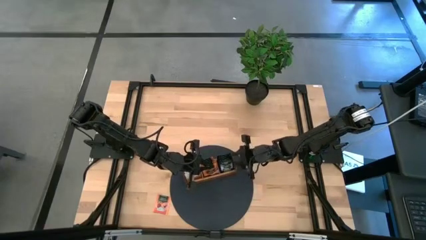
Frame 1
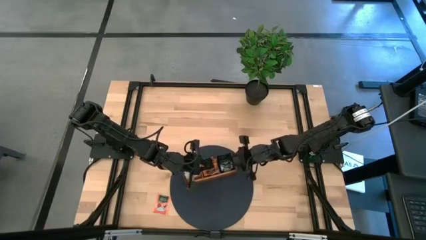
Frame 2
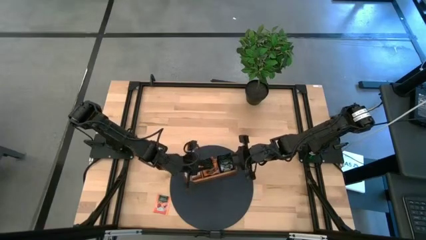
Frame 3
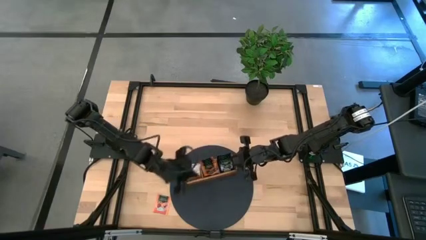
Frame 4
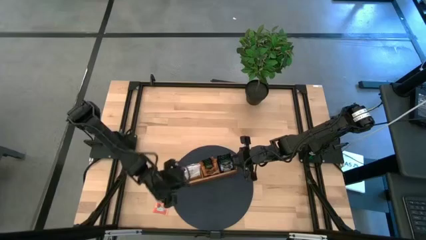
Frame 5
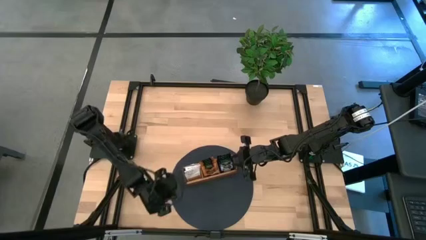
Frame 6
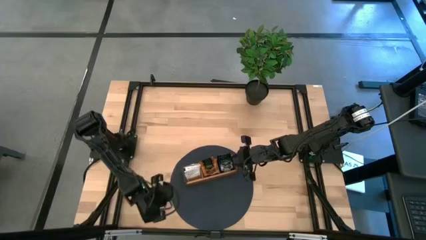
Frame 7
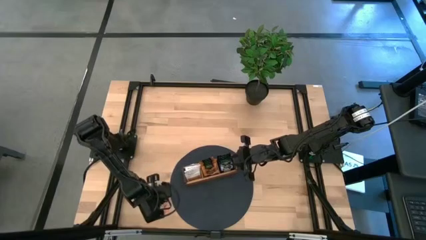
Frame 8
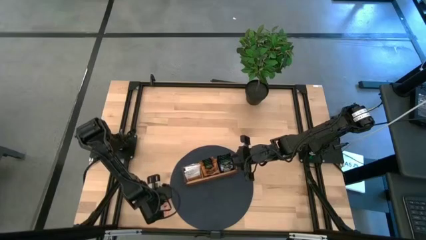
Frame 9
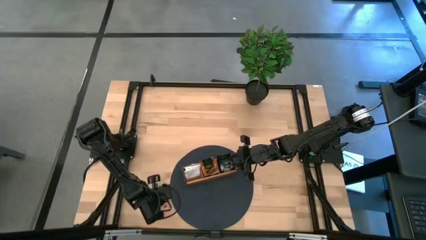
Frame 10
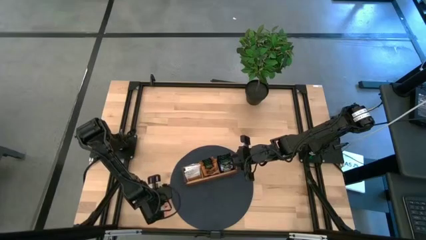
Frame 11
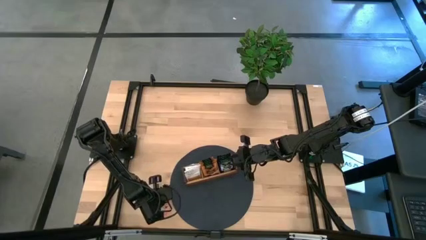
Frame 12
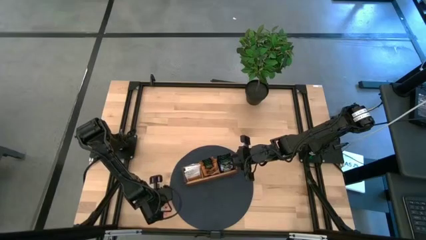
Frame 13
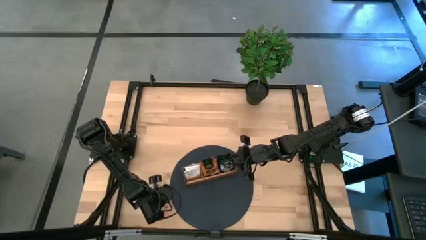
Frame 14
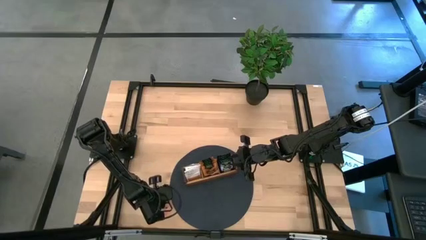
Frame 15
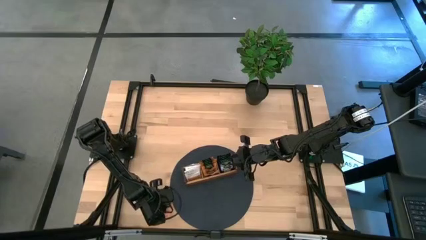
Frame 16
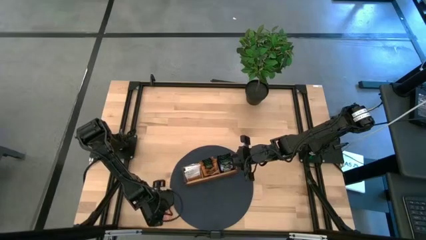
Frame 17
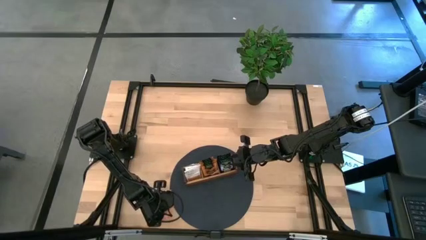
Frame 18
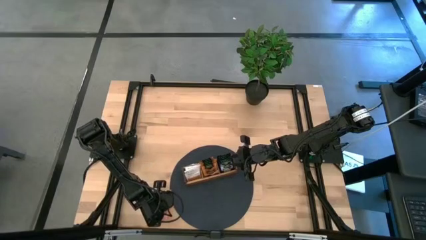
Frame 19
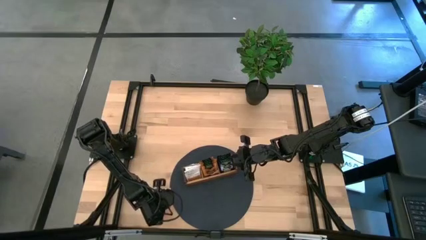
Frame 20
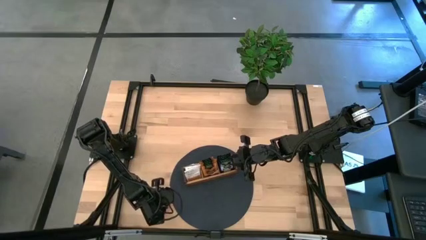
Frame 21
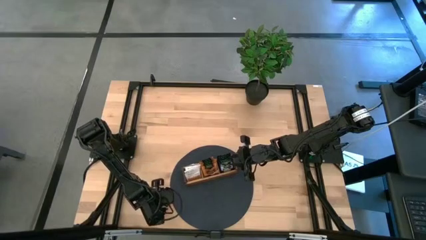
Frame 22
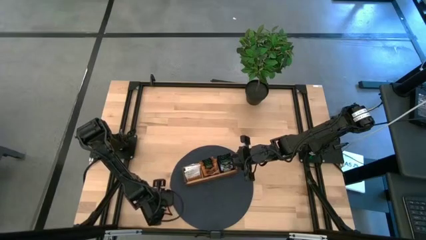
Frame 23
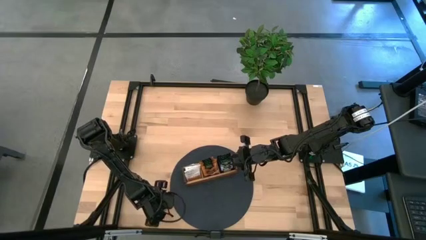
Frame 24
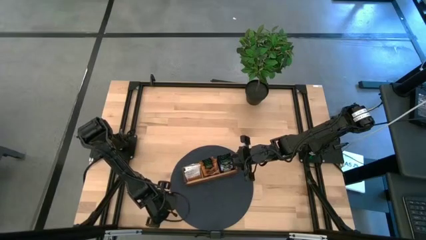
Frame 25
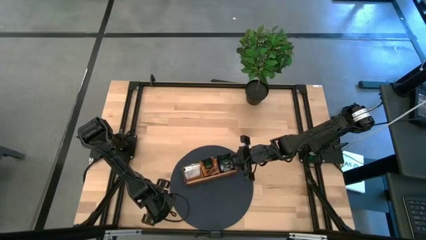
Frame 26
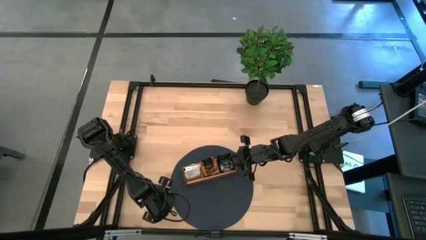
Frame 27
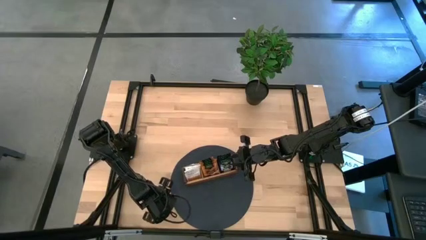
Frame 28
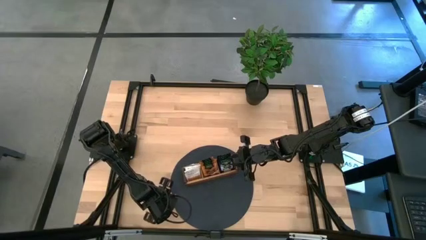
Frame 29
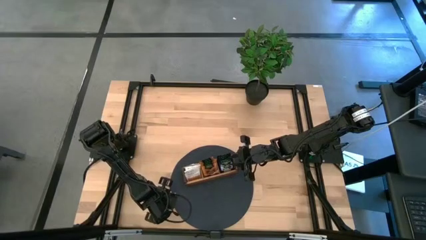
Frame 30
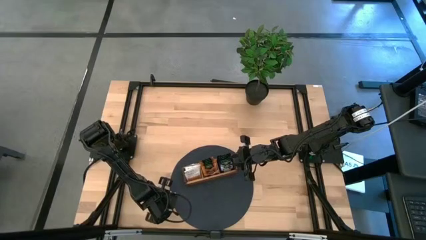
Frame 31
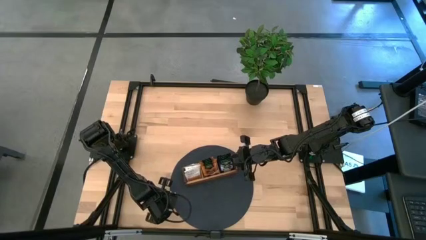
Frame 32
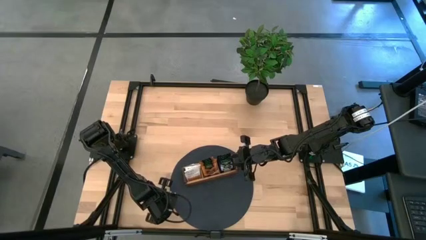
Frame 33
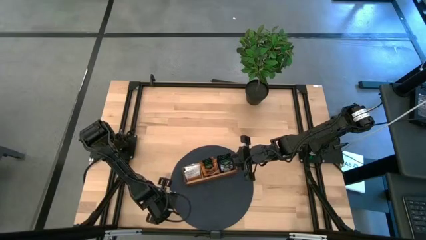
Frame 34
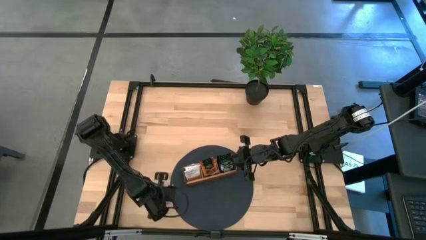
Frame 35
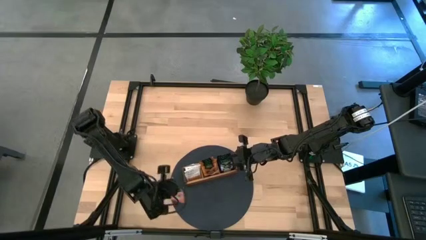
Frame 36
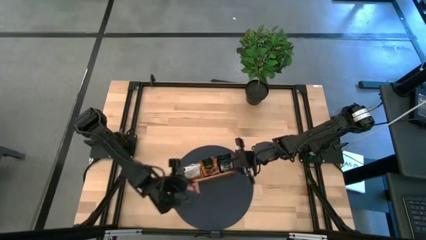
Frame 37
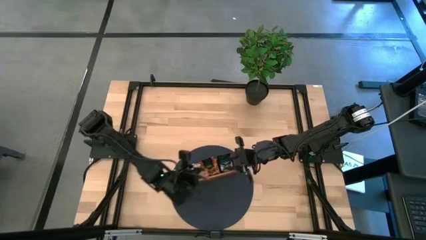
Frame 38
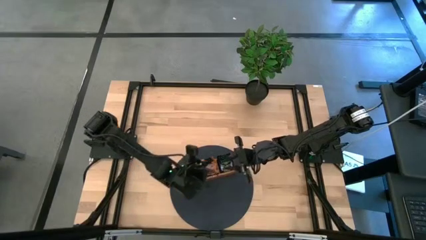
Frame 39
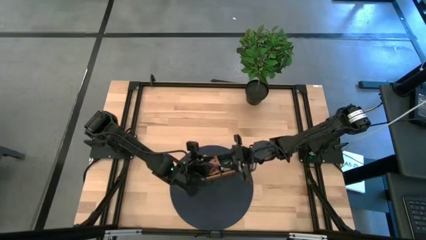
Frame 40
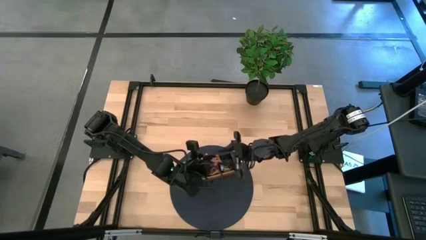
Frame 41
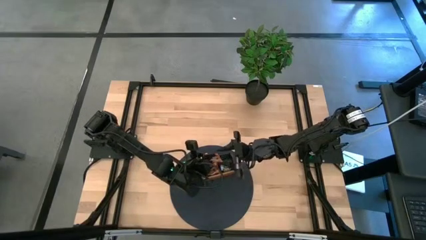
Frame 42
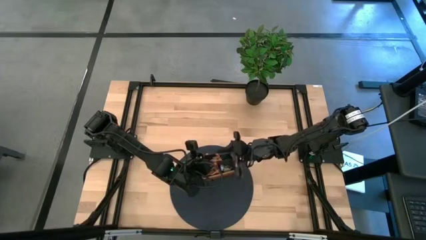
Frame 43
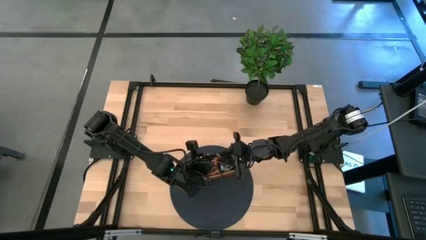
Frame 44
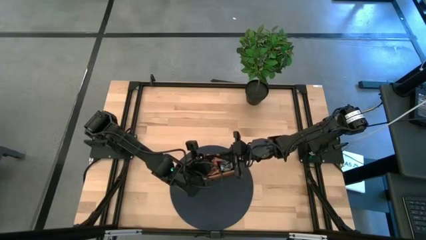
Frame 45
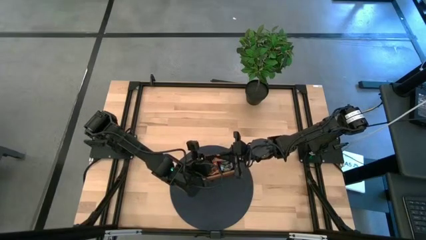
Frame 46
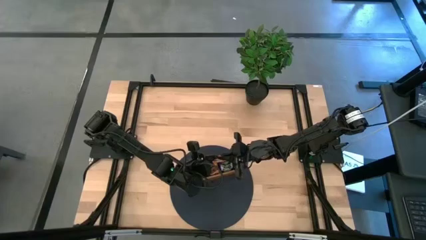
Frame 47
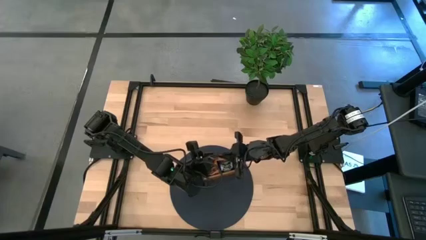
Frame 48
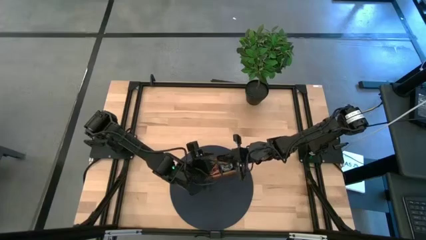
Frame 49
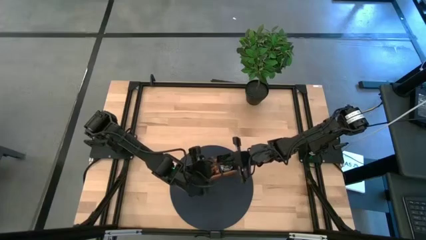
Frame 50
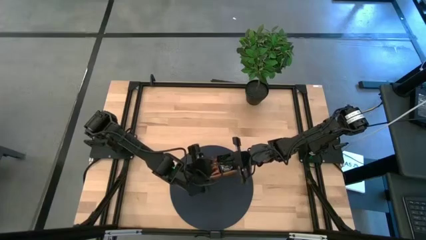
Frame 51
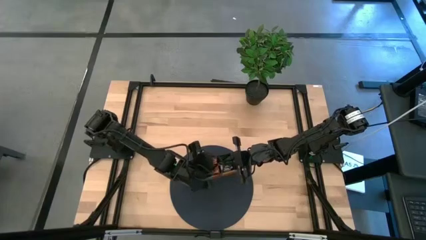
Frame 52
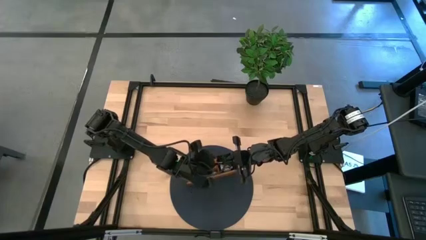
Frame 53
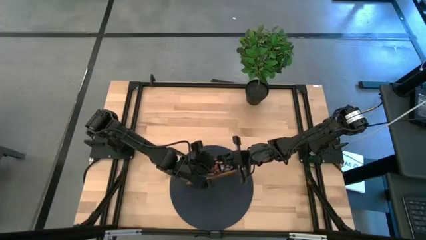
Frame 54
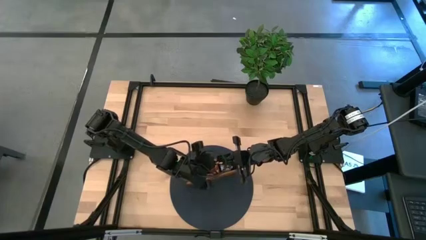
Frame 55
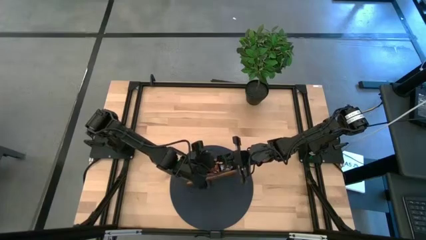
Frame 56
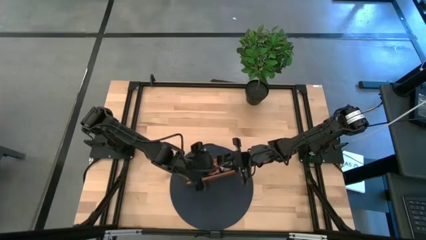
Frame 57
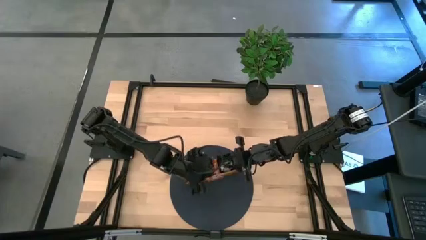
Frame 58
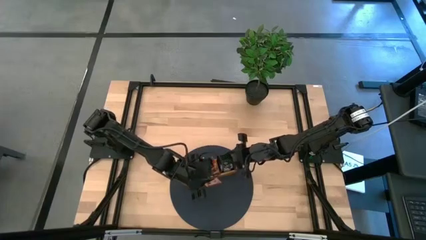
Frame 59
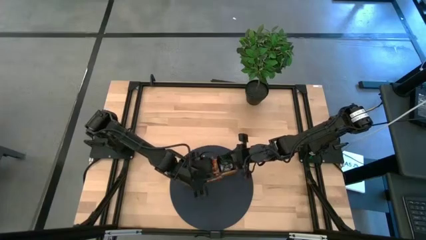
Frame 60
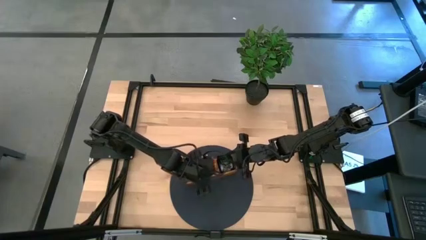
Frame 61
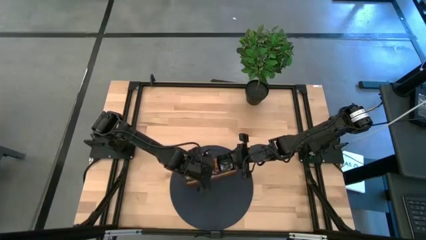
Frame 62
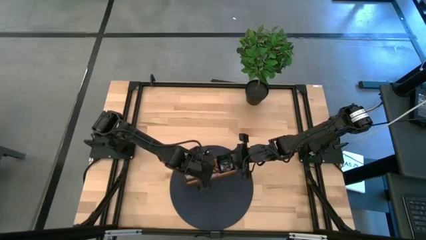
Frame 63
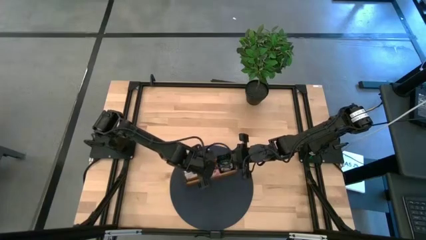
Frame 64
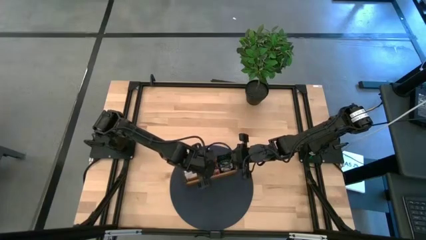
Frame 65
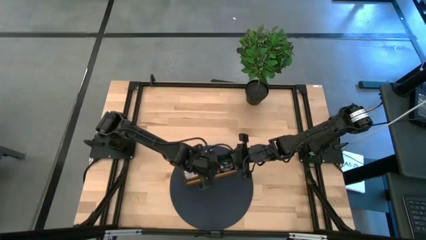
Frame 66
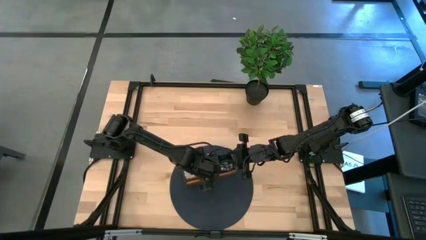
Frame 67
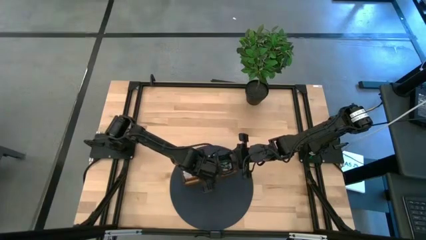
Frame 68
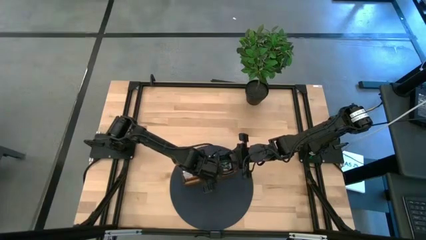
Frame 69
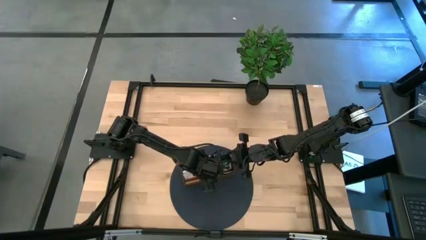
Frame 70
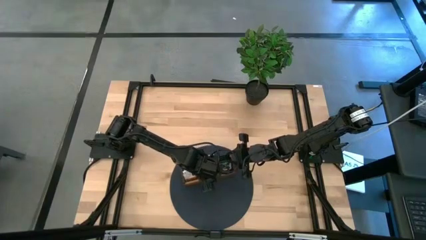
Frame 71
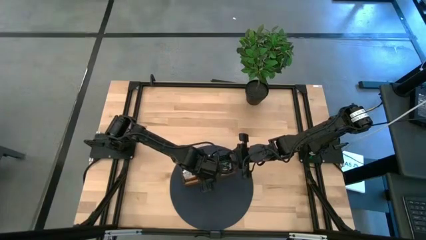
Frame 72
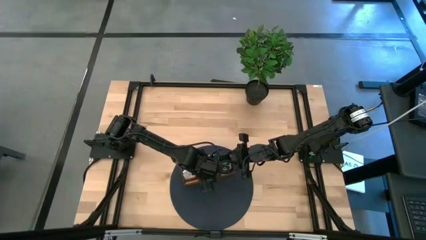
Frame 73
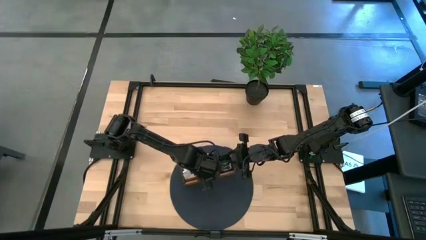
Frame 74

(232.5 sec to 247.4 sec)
Task: Pick & Place Tea
Put the orange black tea bag into the middle section of the wooden organizer

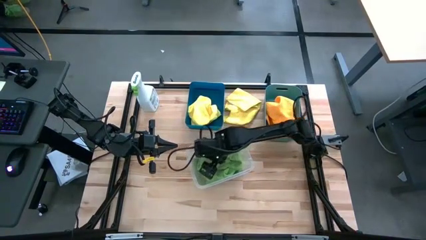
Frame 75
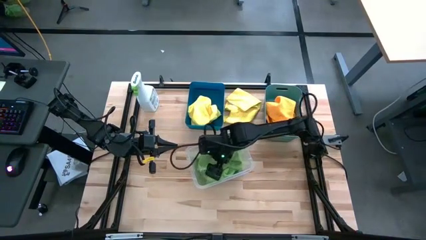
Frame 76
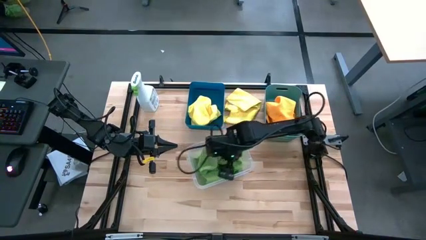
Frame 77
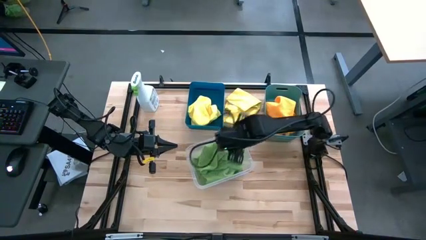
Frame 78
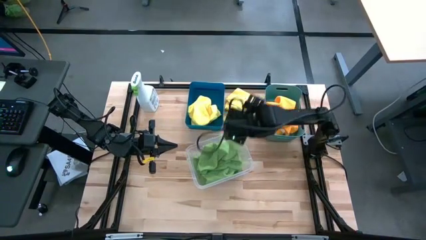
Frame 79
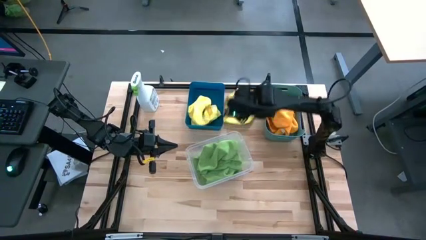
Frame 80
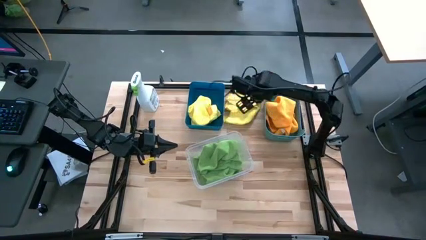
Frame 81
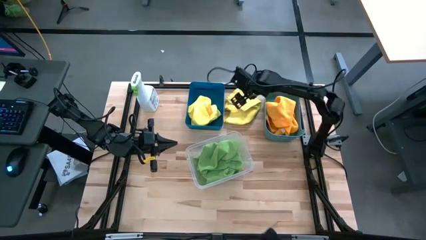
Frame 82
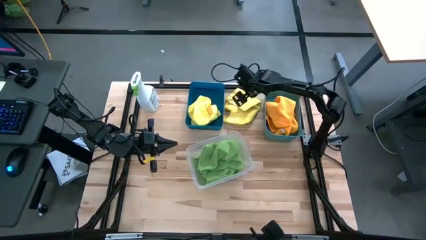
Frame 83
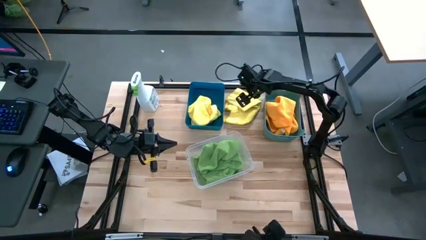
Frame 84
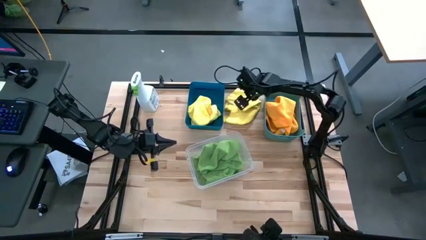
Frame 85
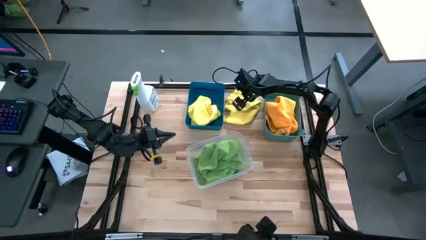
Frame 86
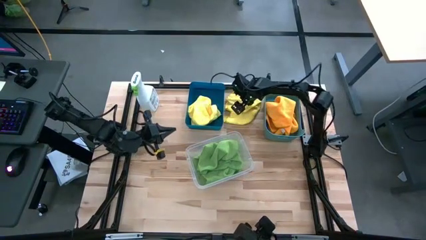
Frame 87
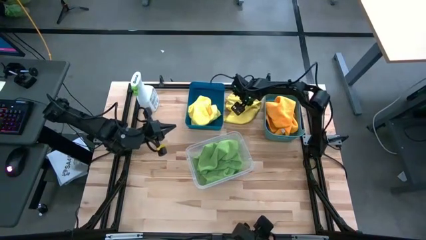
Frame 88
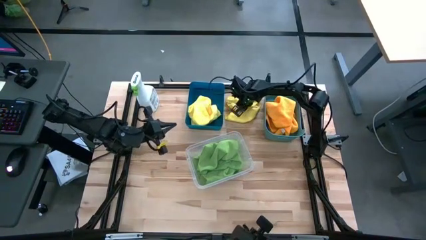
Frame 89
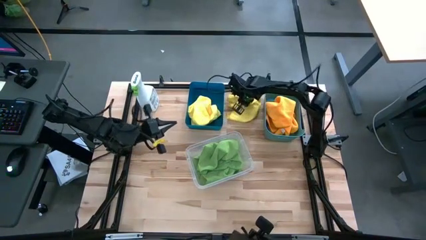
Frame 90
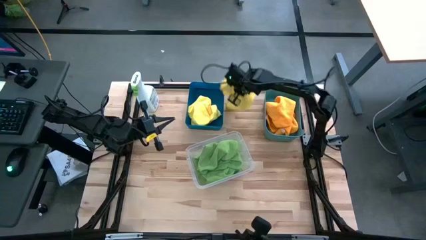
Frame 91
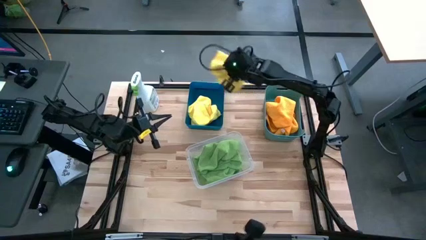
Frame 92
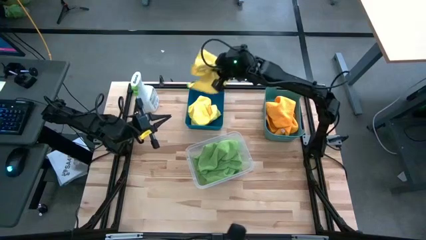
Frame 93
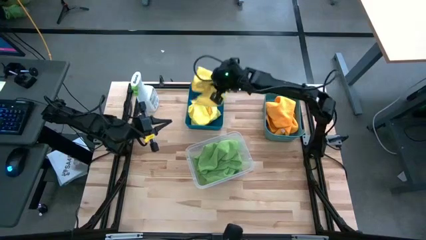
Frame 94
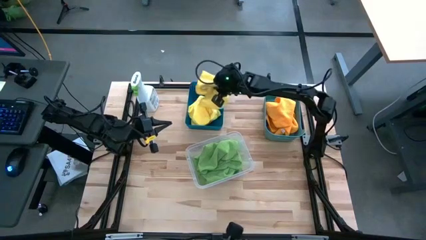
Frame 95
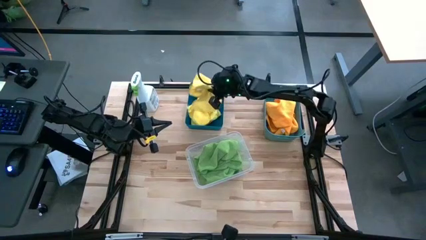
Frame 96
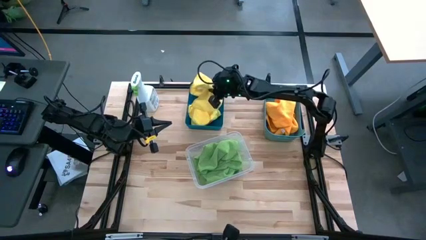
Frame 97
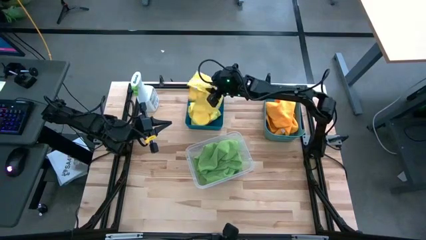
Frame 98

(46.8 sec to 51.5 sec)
Task: Sort microfiber towel by color & place in baskets
Put the yellow towel into the blue bin
